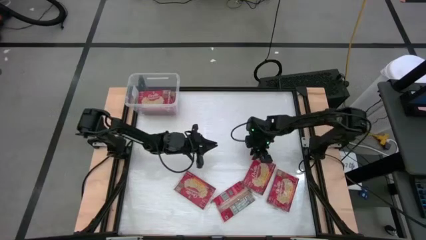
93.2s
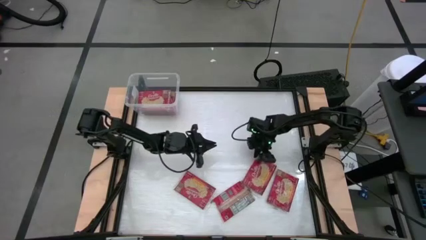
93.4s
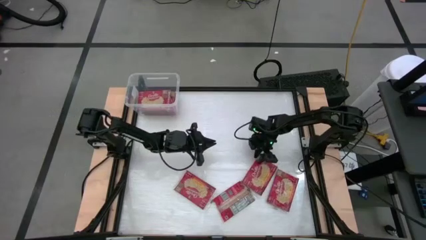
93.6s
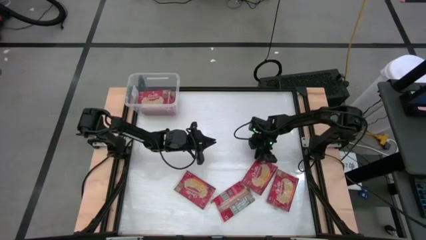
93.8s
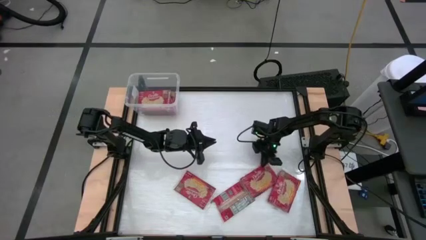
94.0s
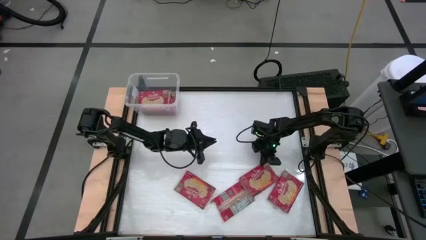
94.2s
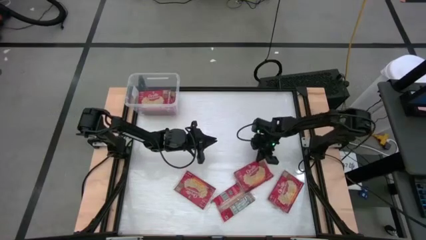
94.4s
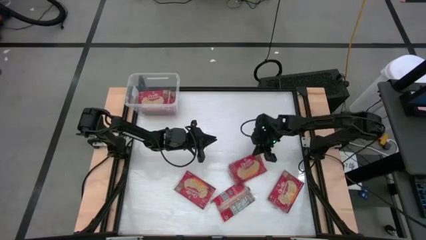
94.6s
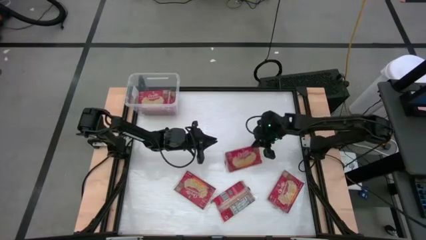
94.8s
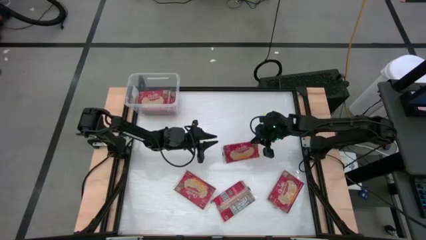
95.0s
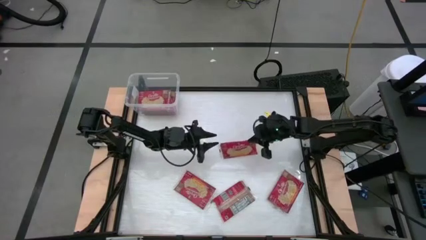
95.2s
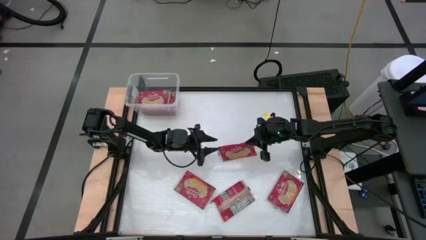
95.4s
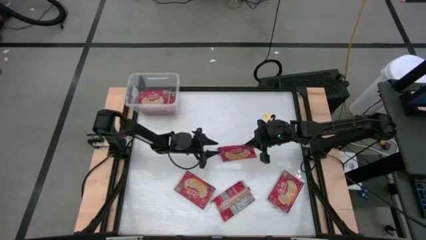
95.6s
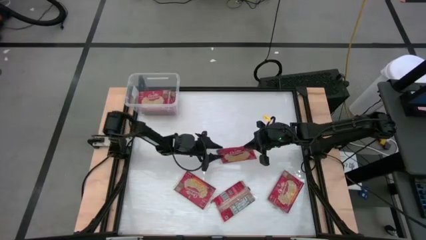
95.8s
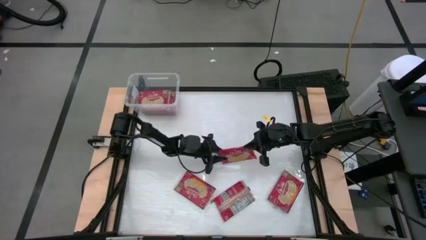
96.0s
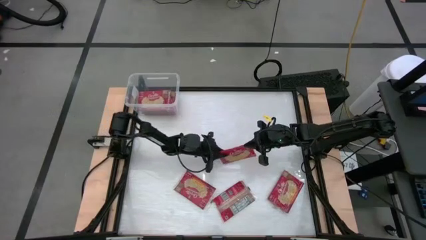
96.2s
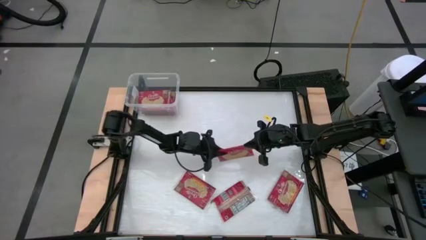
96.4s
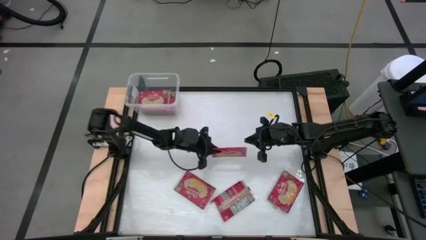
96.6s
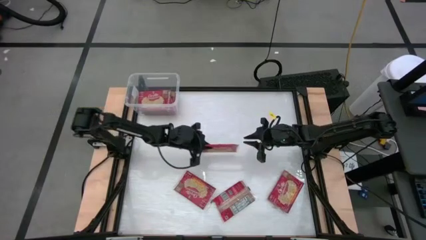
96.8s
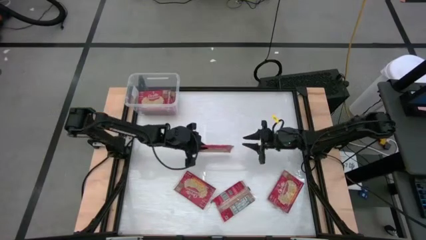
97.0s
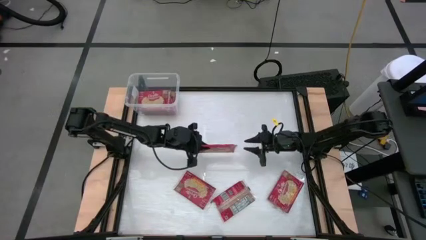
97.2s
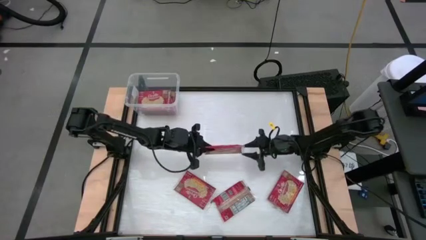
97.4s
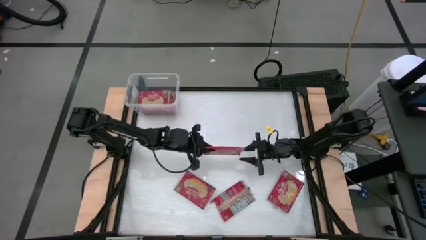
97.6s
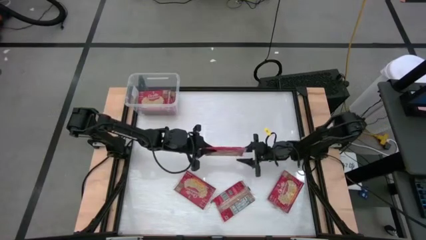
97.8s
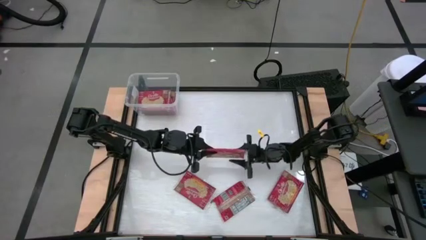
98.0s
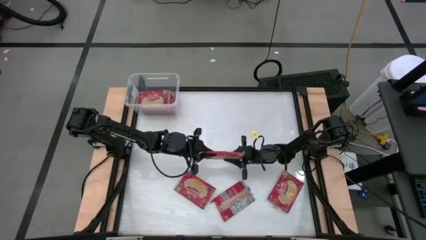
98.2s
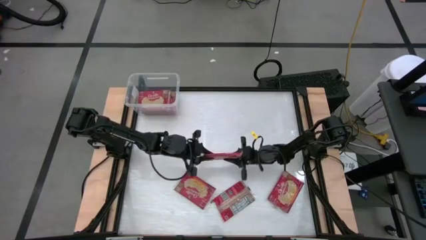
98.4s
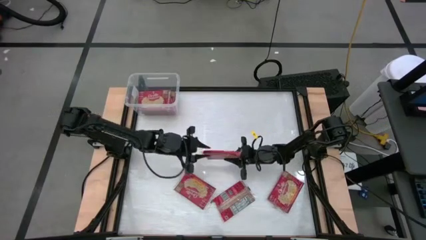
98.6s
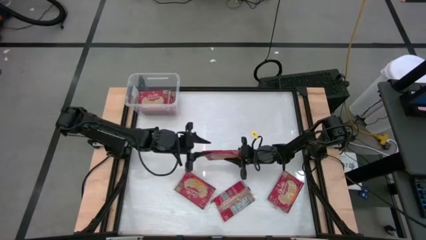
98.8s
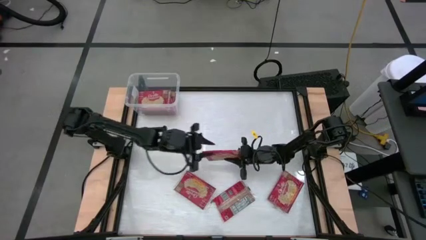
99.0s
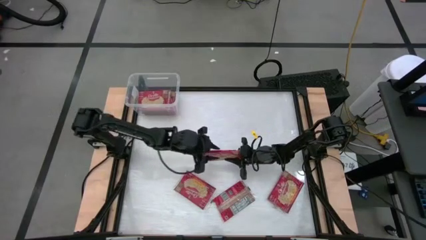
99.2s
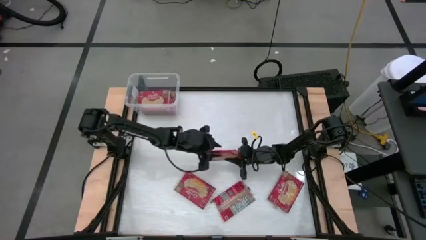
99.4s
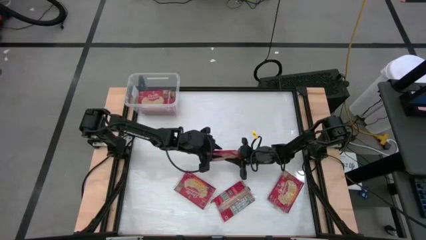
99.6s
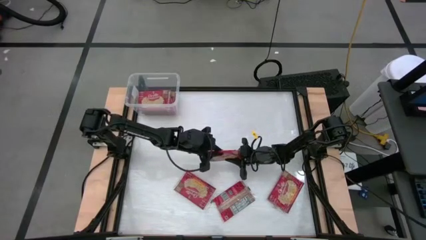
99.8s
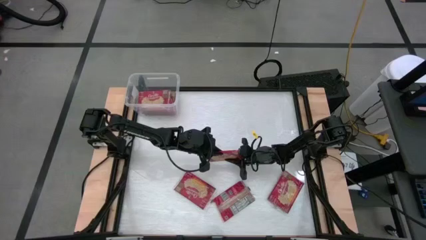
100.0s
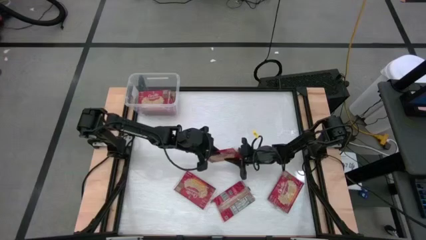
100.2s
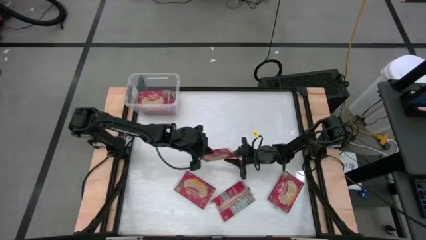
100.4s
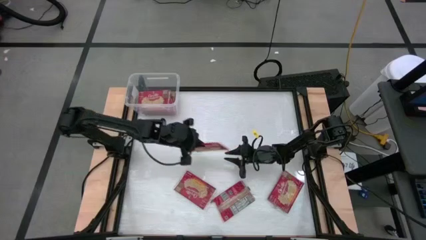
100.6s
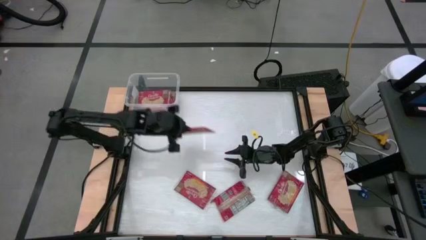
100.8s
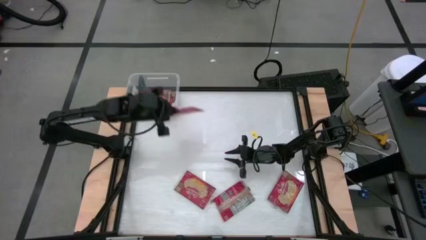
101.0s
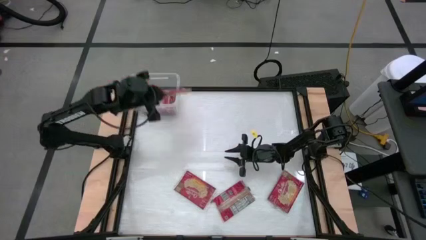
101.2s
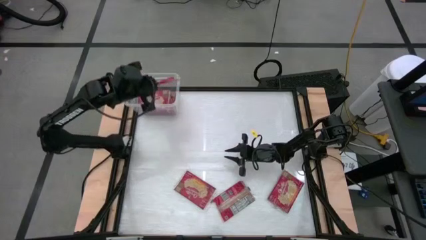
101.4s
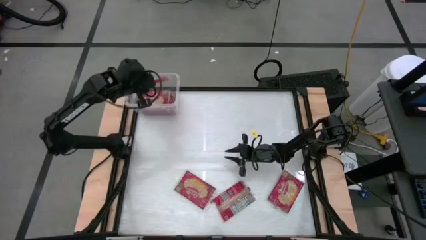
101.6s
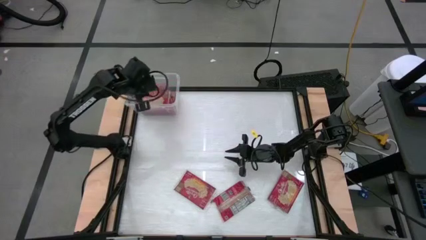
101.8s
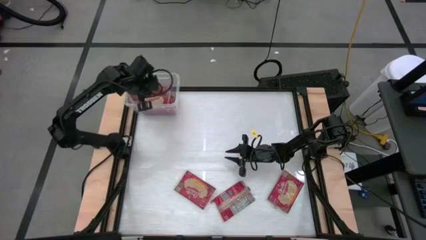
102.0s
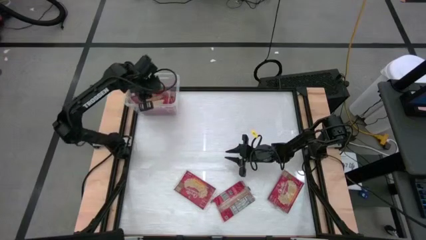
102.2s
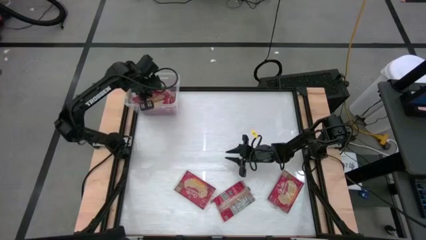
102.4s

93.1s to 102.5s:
Task: Sort popcorn bags into baskets
Put the red popcorn bag into the transparent container

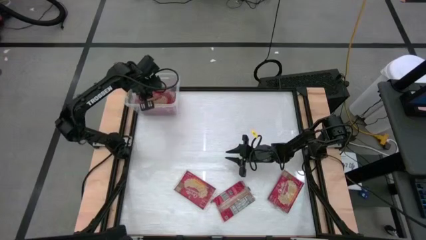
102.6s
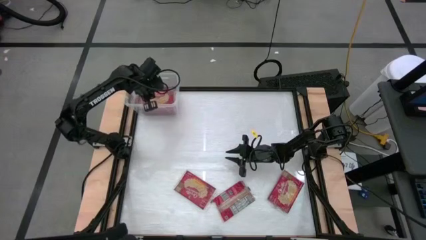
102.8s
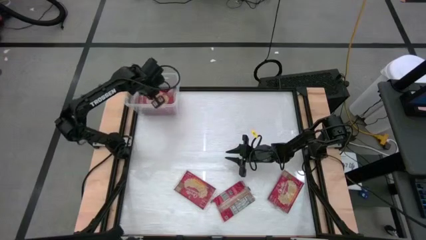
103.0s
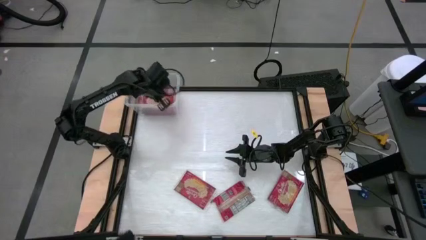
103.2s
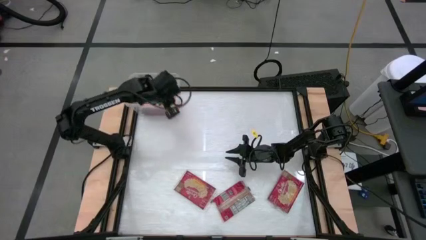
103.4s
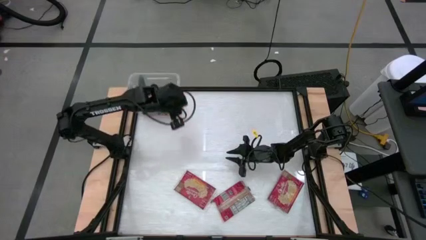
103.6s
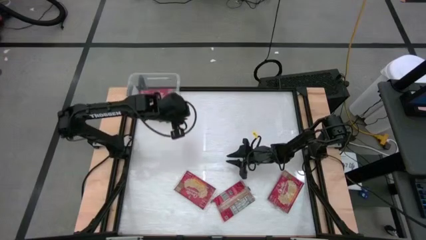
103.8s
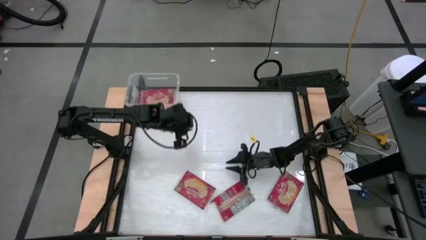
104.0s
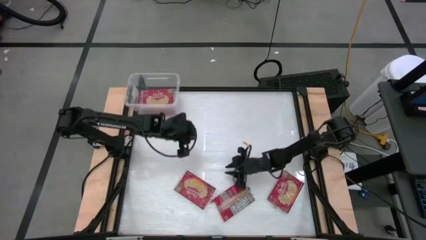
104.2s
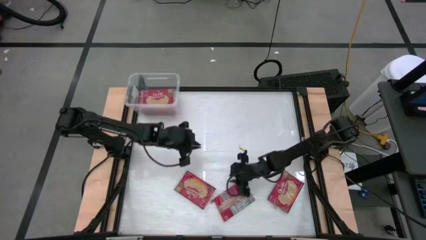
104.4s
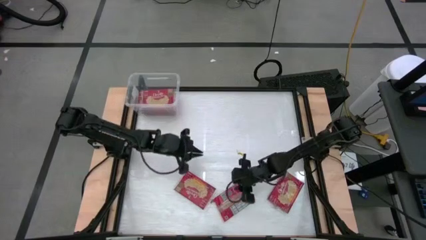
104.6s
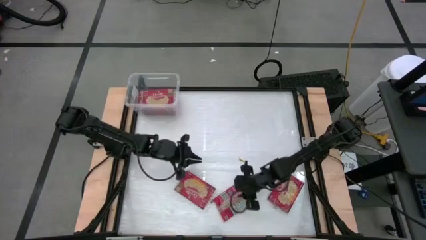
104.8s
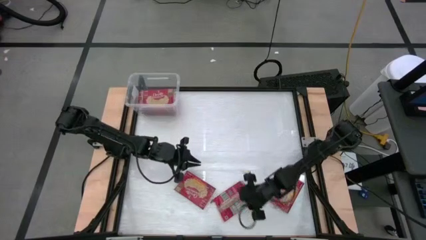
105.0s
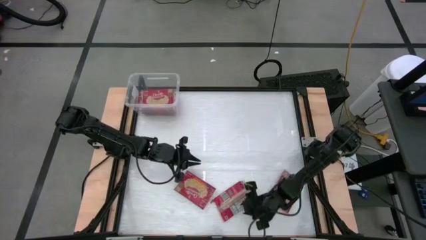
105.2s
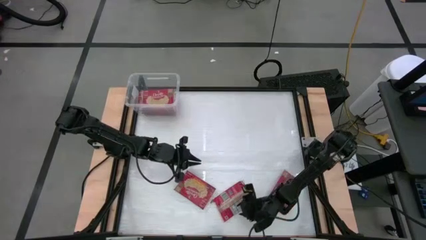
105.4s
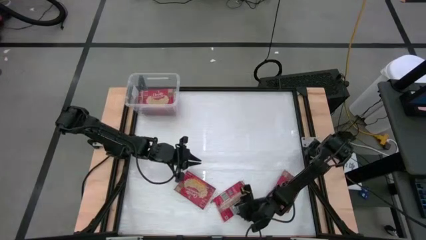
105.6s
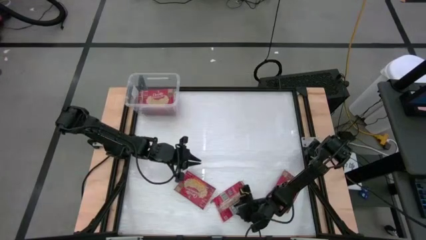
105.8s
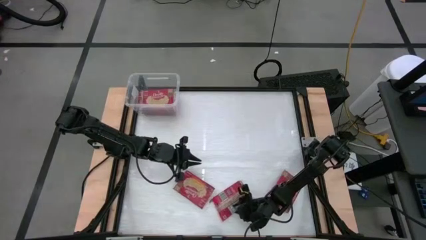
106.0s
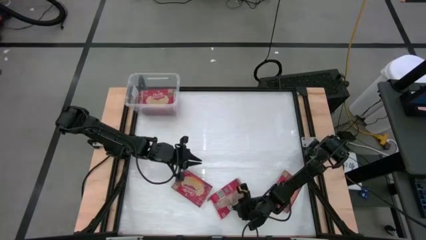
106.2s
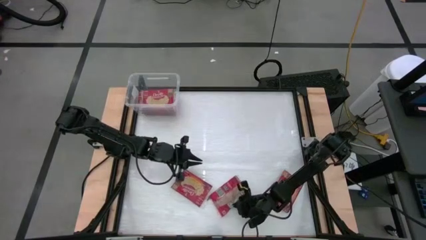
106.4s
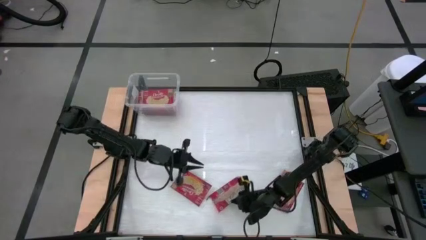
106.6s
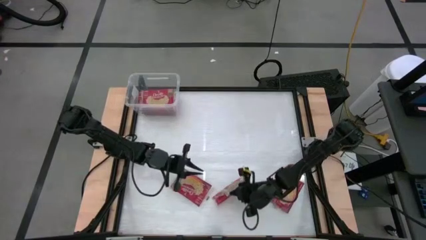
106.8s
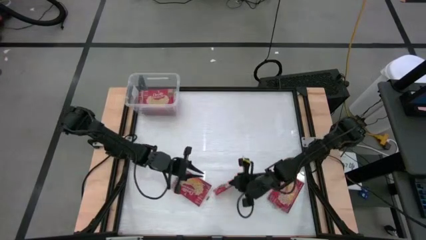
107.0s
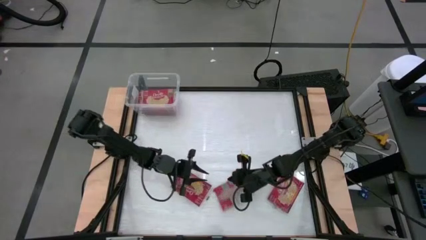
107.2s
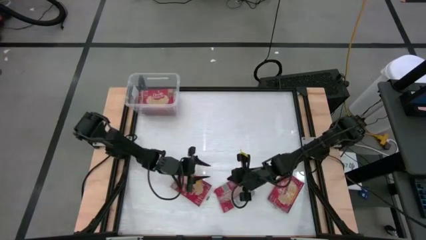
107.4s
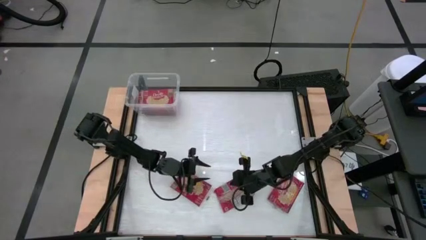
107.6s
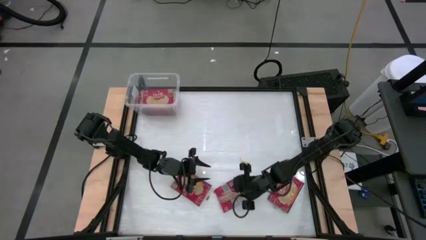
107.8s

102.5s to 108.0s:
Put the red popcorn bag into the transparent container

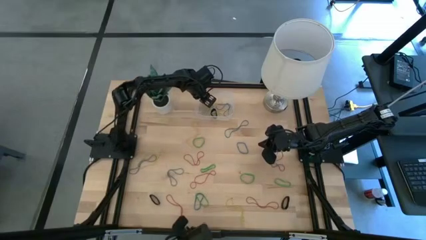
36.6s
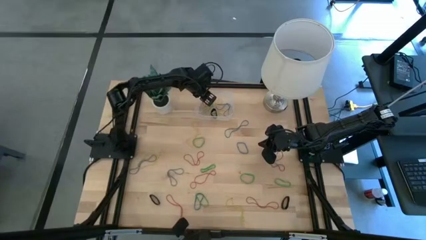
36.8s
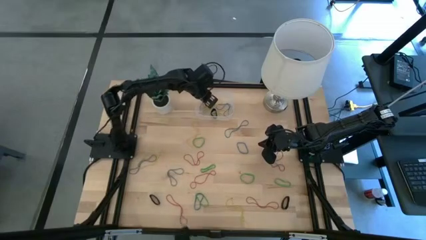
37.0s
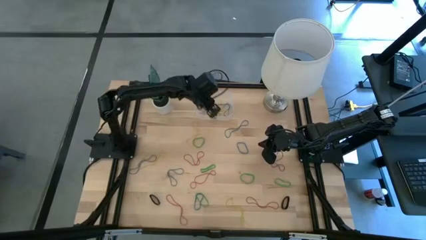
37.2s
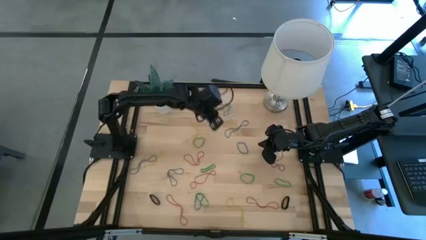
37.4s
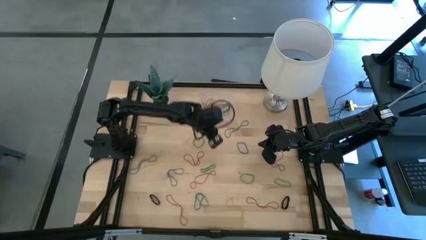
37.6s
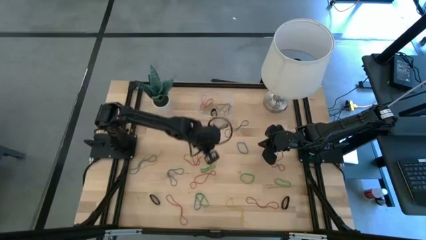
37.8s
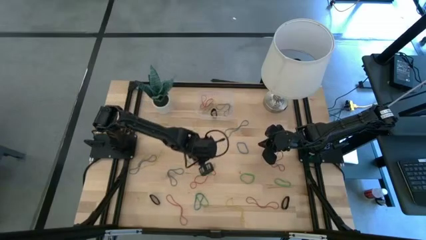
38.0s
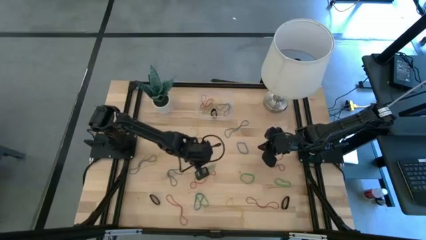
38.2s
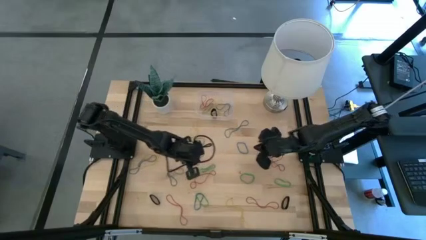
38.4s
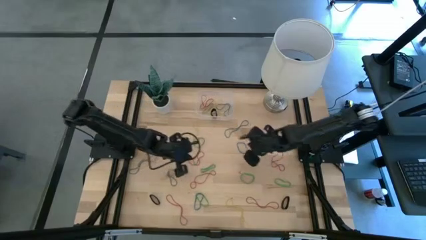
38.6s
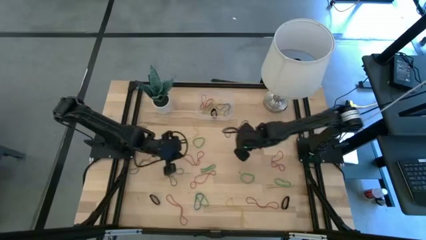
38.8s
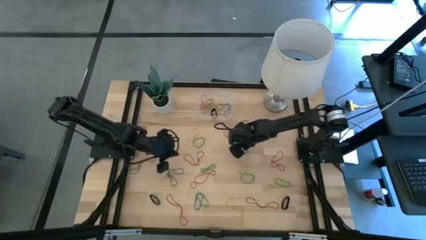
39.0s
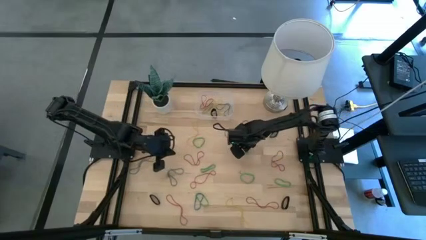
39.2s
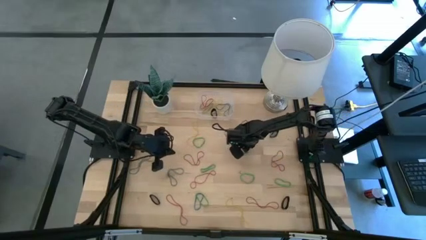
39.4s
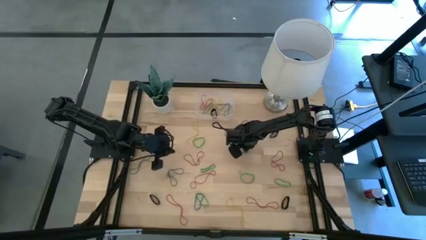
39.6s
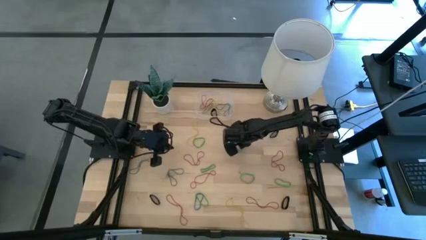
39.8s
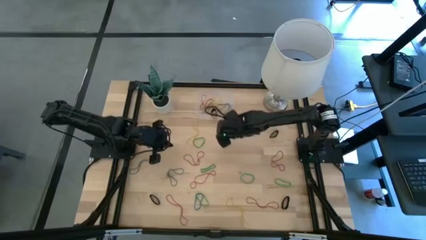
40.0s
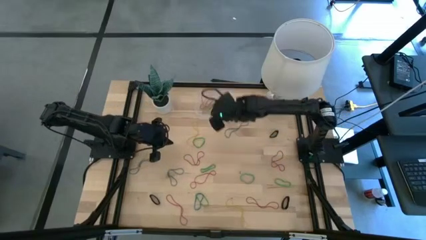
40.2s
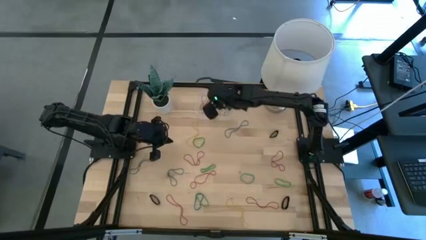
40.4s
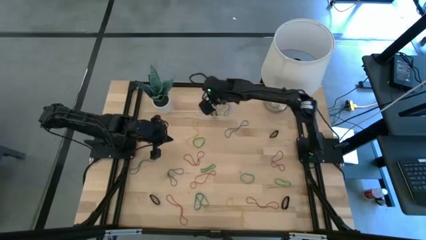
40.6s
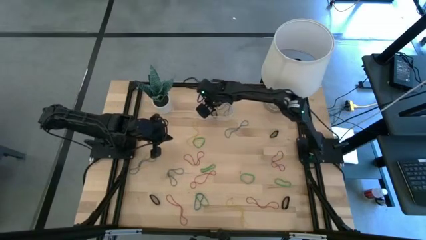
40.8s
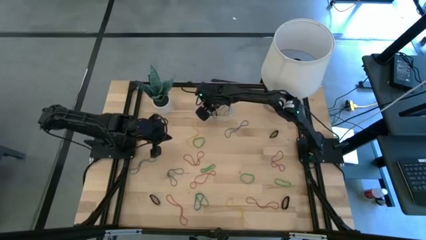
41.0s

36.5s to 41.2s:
Task: Pick and place rubber bands into bin
Put the blue rubber band into the transparent bin
